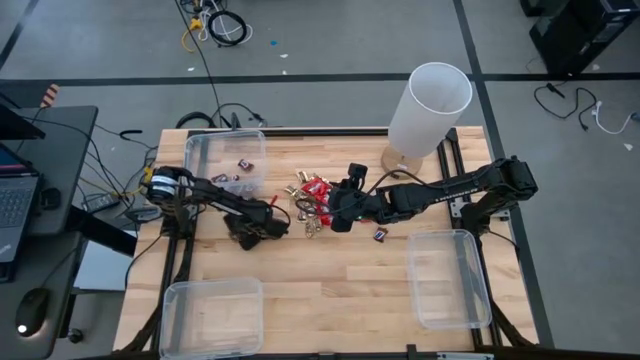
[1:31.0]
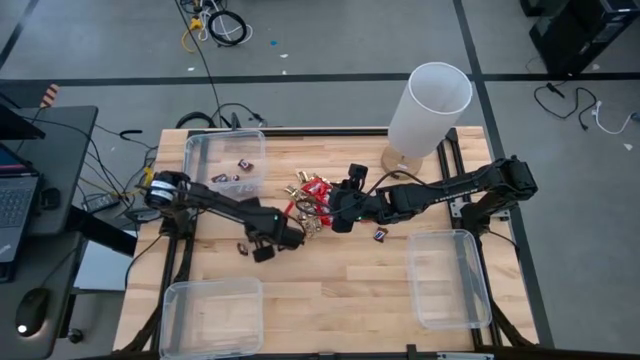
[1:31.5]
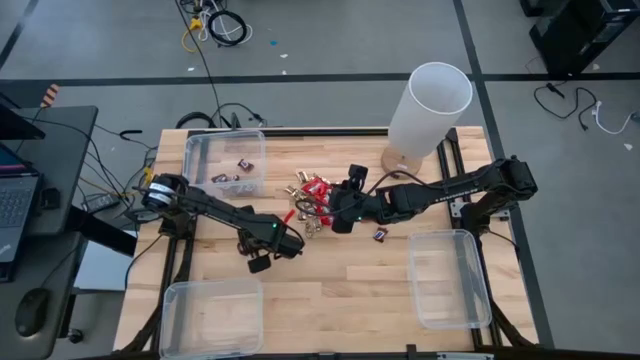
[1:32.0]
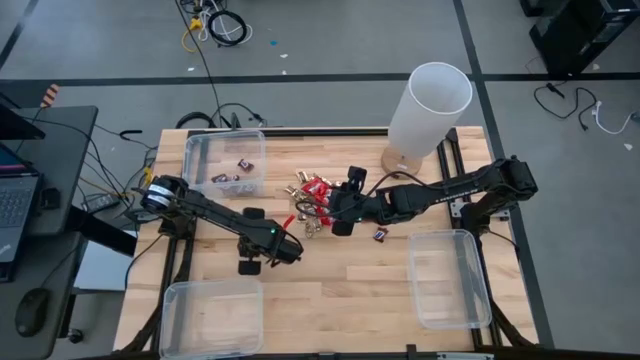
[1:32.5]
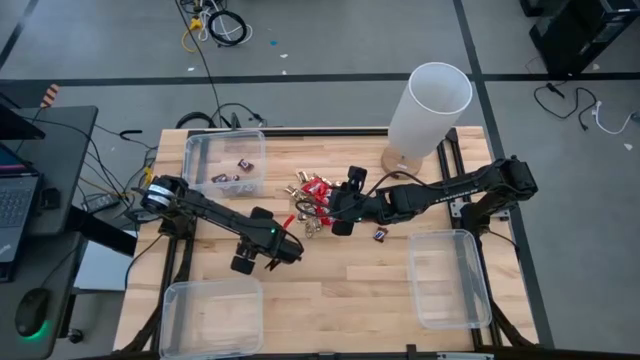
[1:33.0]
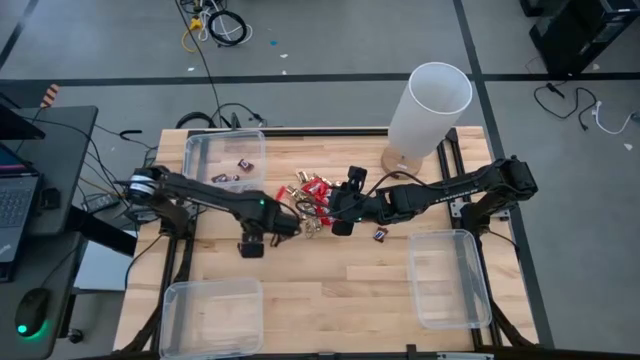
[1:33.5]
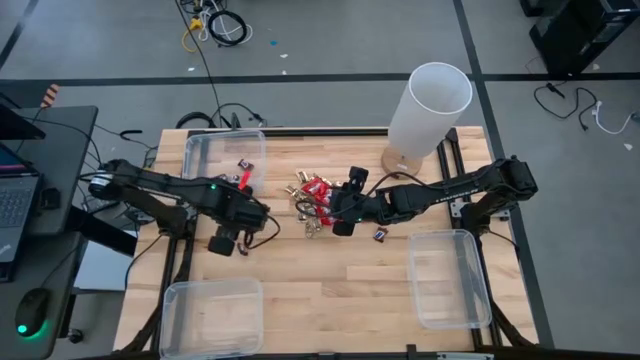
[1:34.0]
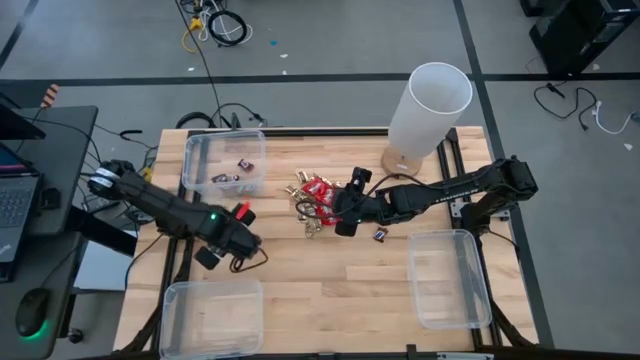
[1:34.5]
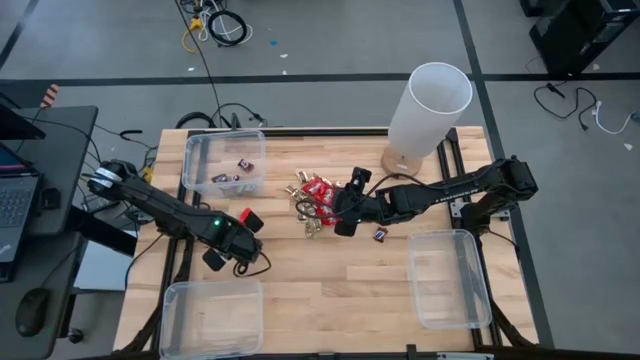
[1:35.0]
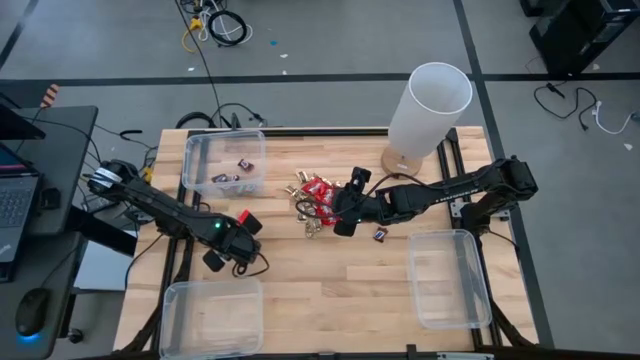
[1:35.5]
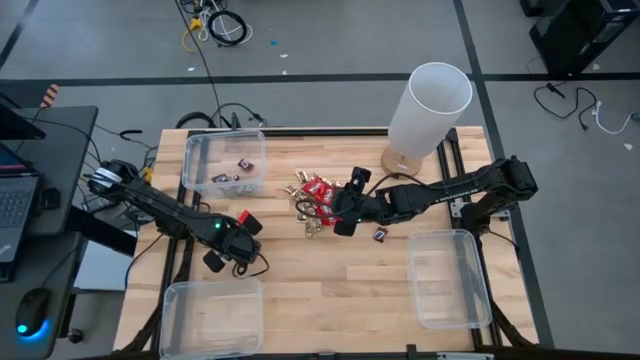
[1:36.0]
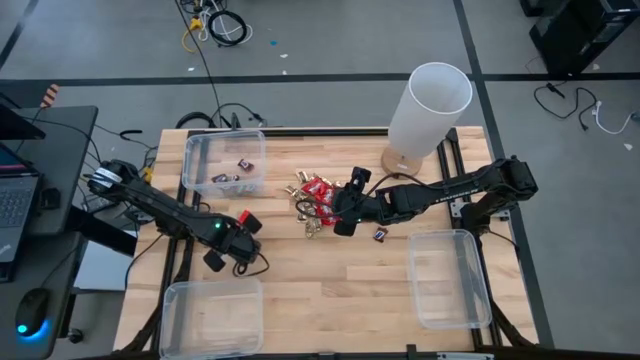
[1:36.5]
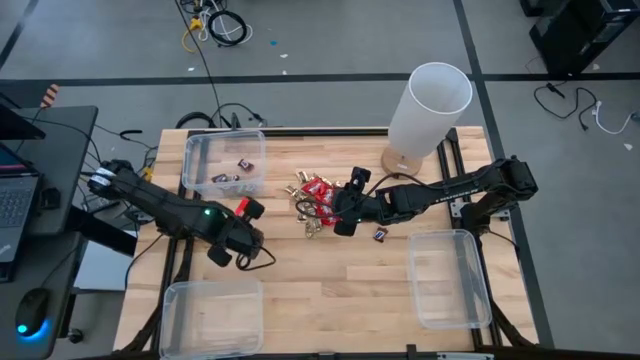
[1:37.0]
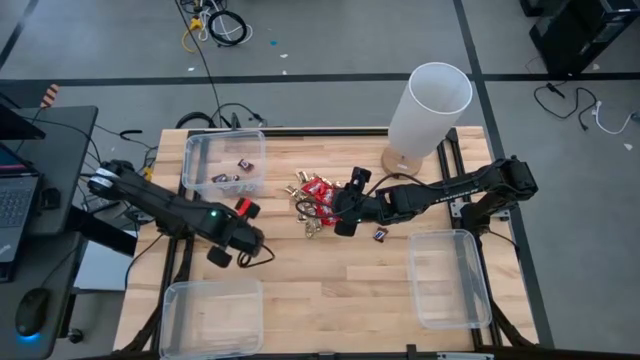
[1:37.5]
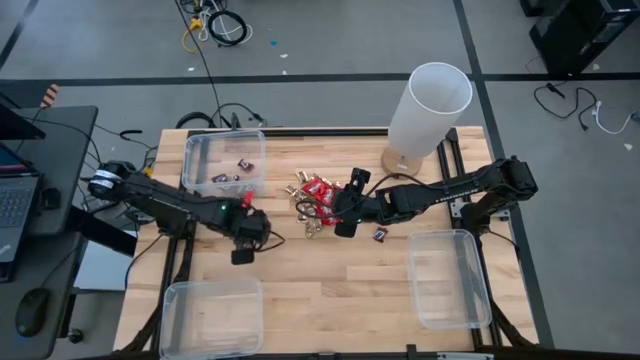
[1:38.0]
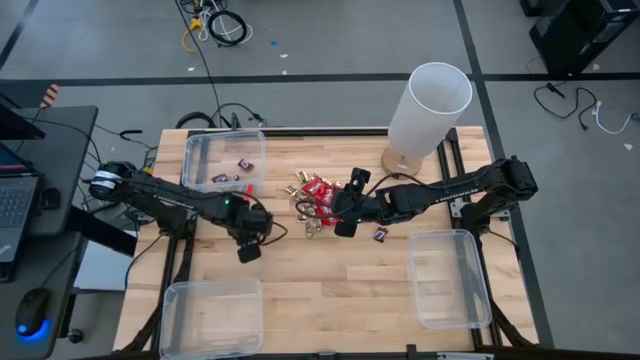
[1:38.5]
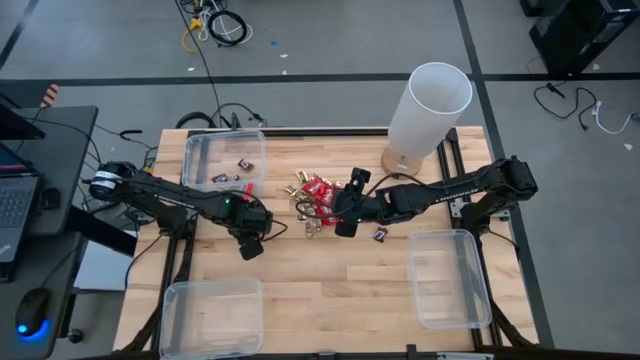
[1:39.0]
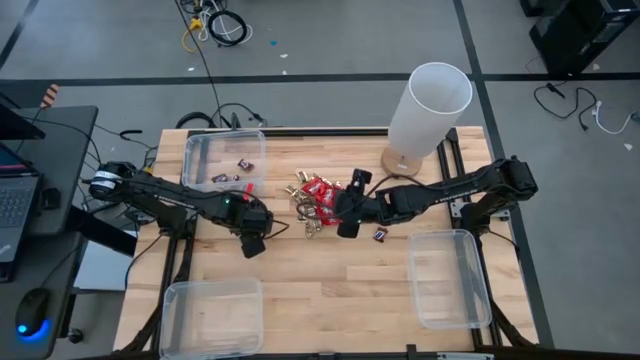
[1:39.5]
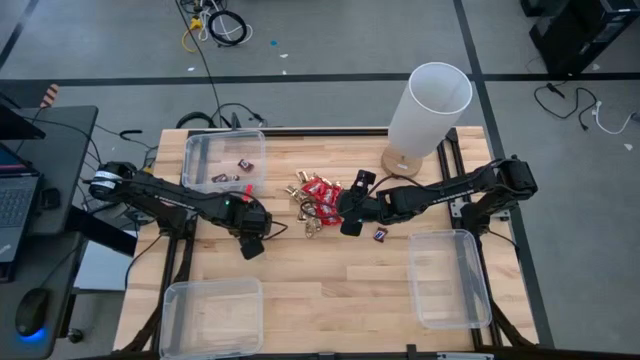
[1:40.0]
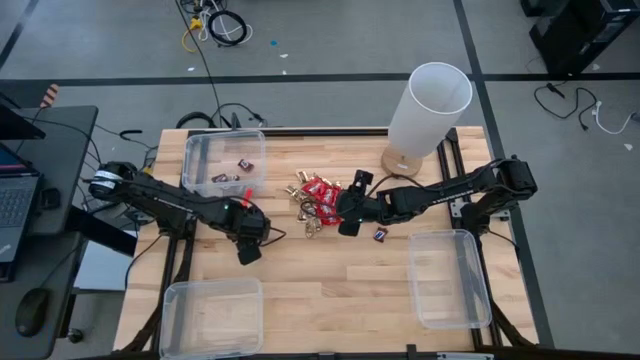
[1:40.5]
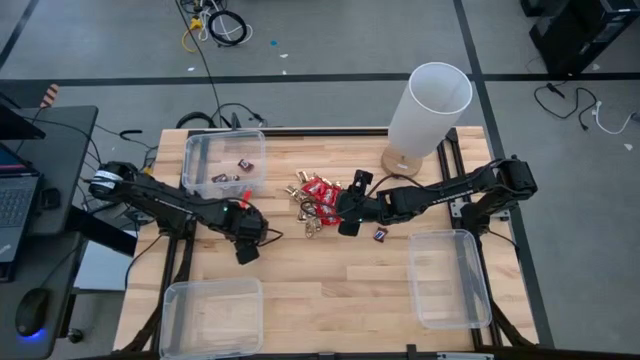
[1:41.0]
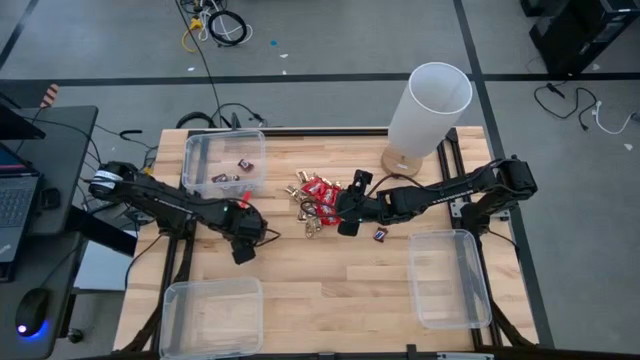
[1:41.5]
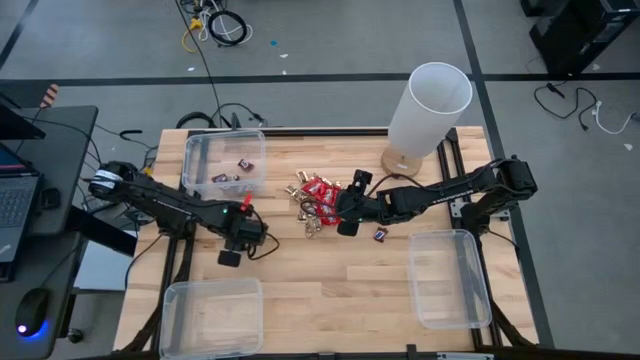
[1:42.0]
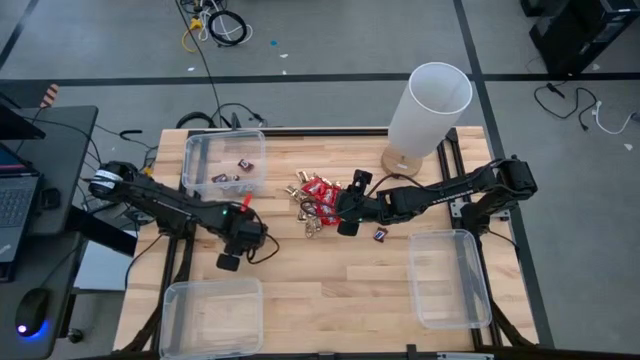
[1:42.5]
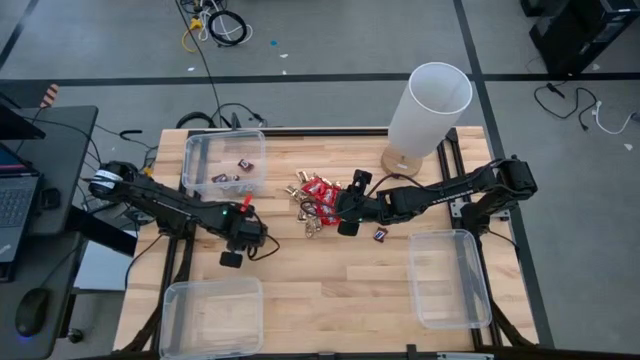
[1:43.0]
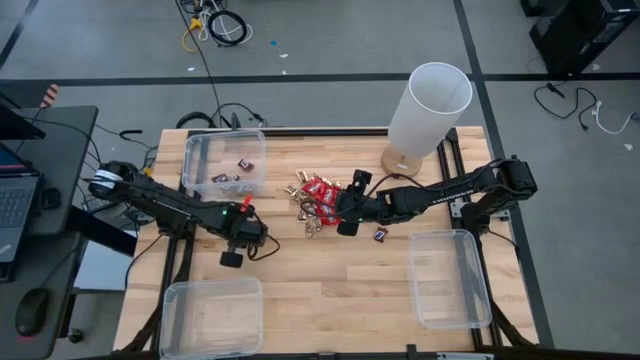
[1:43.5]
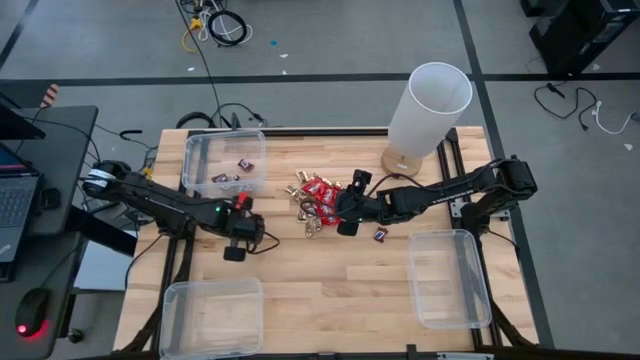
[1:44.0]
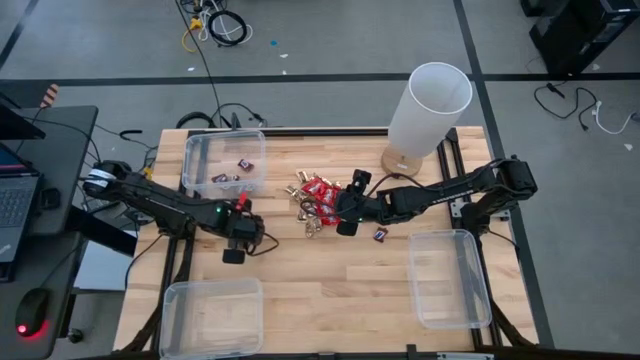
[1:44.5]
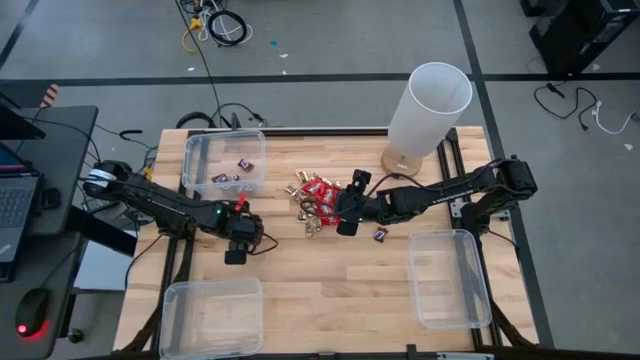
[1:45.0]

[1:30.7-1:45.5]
Task: Sort candy
Put the brown chocolate into the top left transparent bin

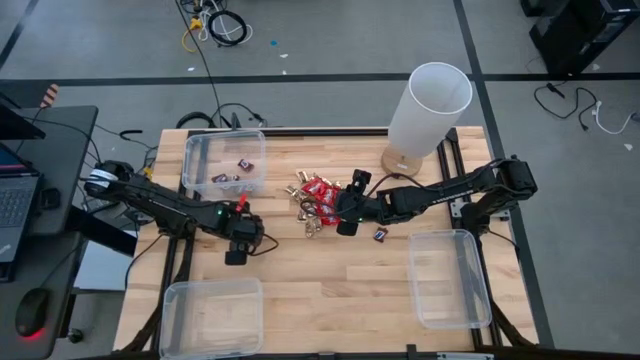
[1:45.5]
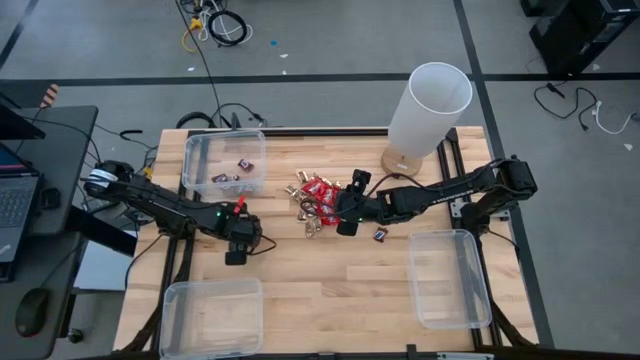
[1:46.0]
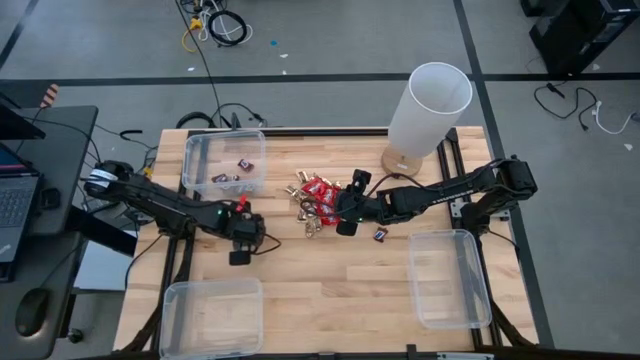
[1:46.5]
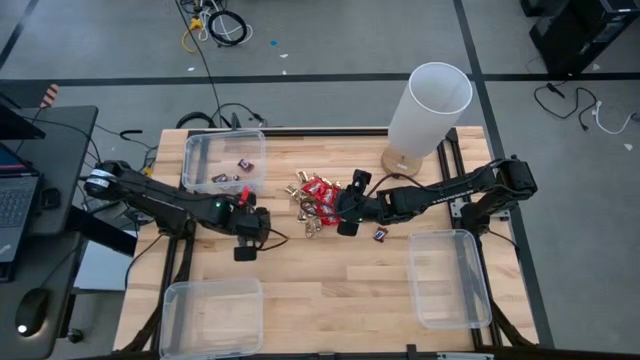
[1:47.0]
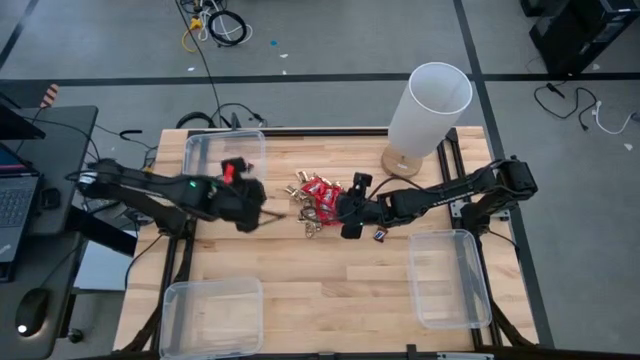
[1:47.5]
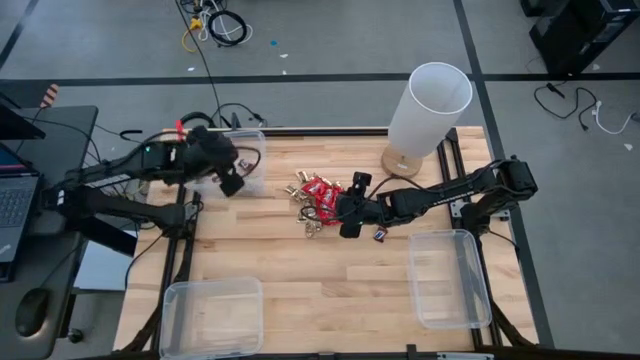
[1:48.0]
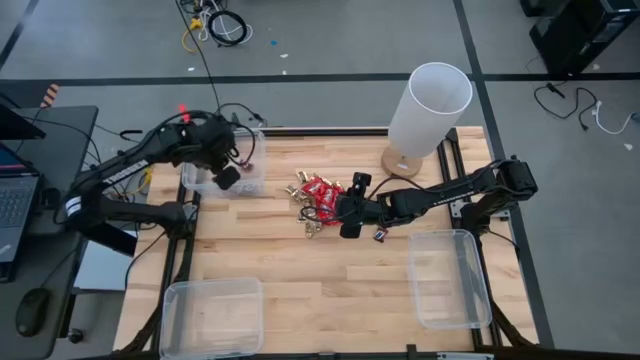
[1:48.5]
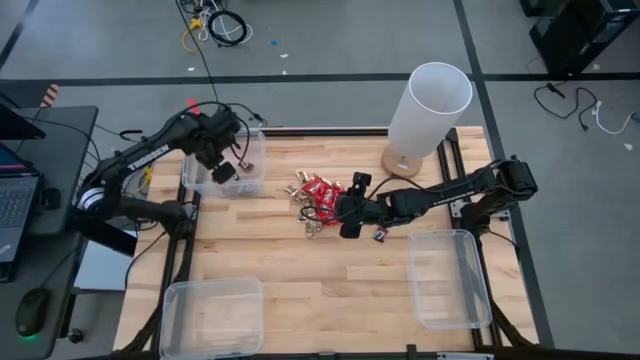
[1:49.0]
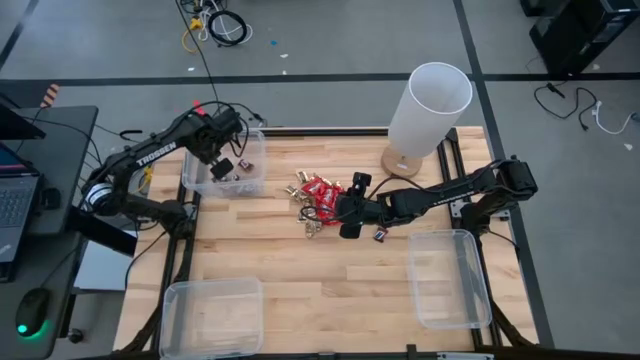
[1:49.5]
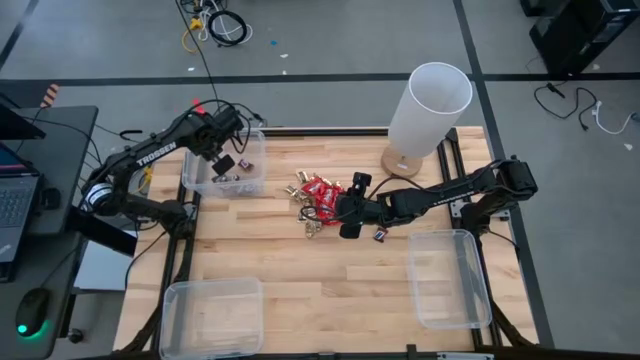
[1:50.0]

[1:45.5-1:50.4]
Put the brown chocolate into the top left transparent bin
